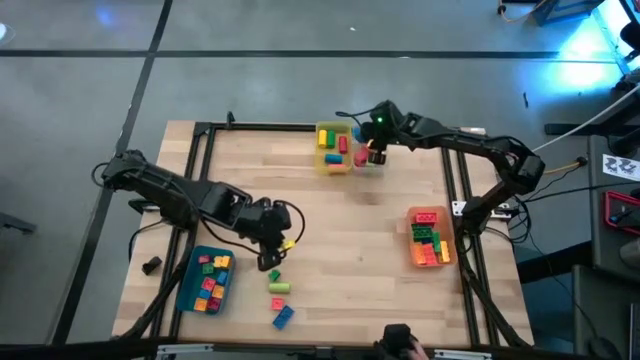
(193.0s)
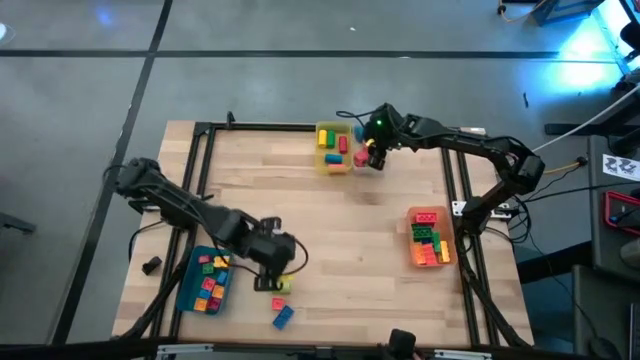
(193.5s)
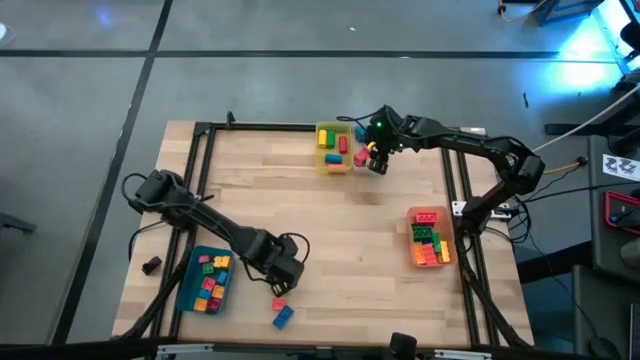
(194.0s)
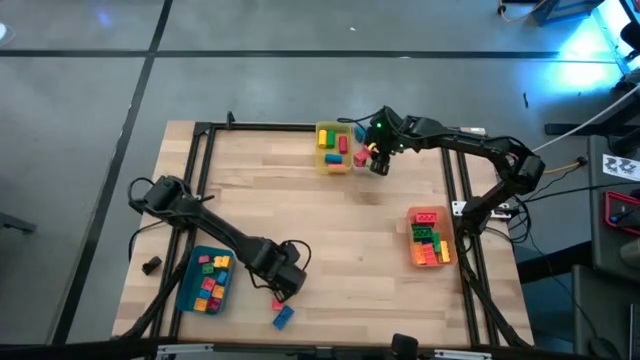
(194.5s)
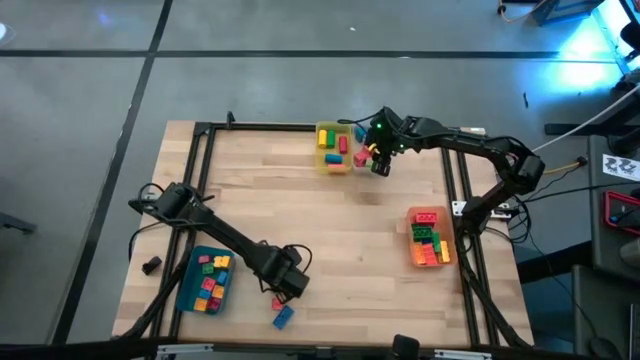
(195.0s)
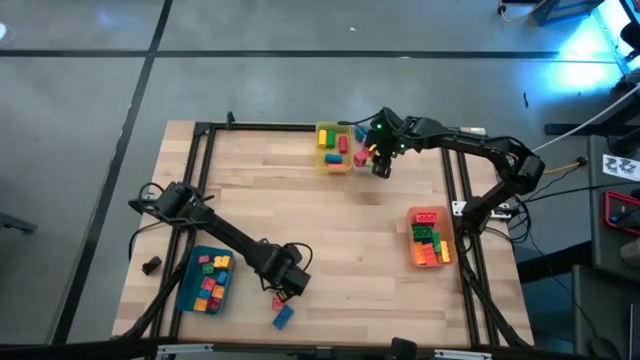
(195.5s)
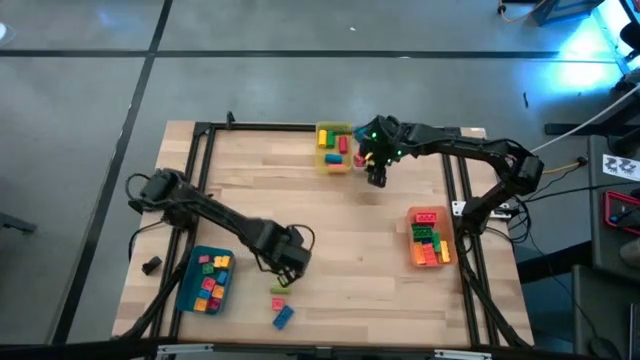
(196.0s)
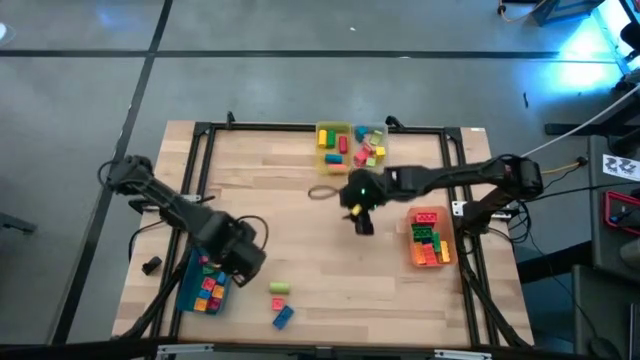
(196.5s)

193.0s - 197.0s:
Task: Sort blocks by size
Put the green square game piece into the blue bin

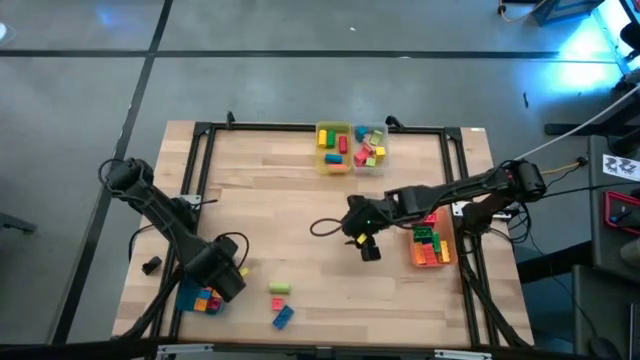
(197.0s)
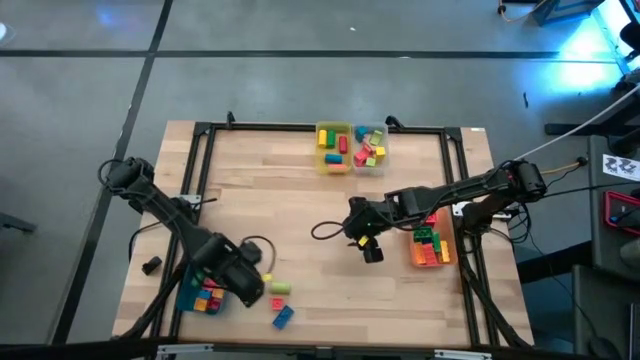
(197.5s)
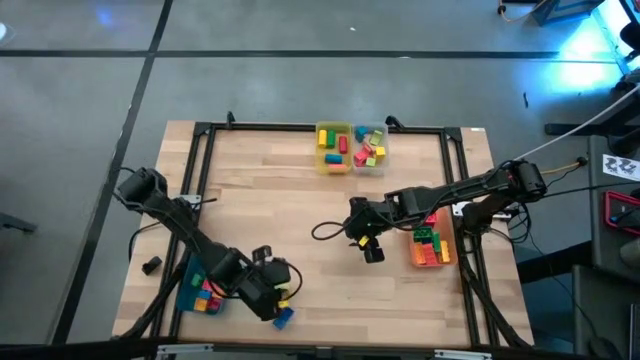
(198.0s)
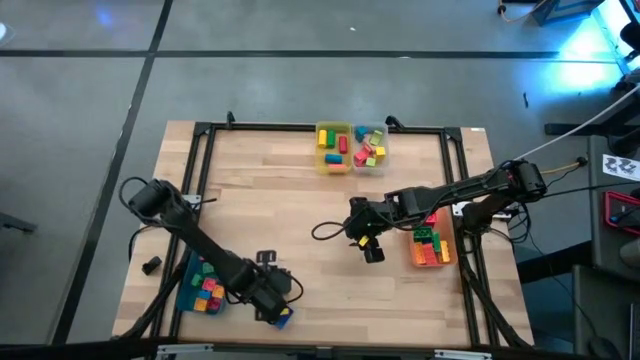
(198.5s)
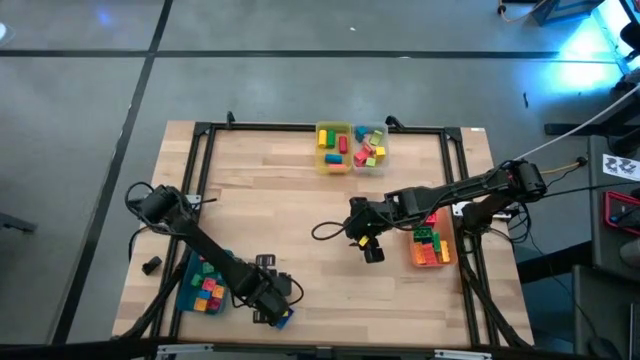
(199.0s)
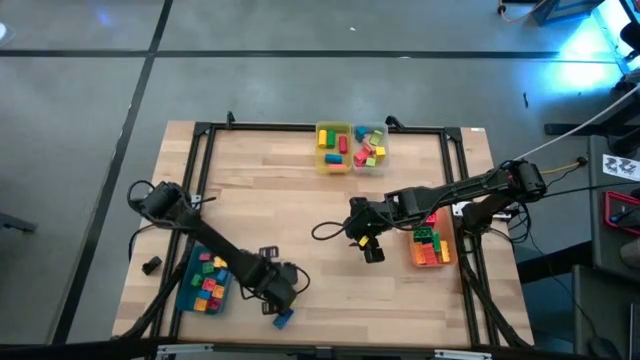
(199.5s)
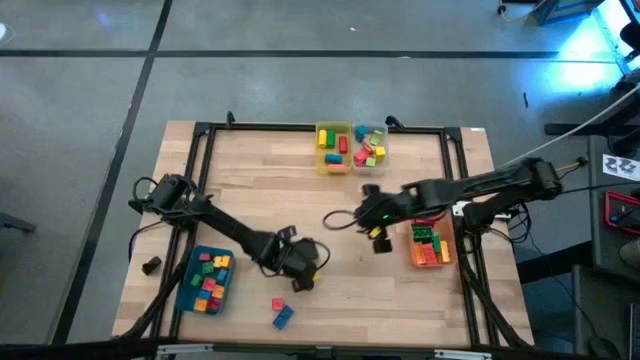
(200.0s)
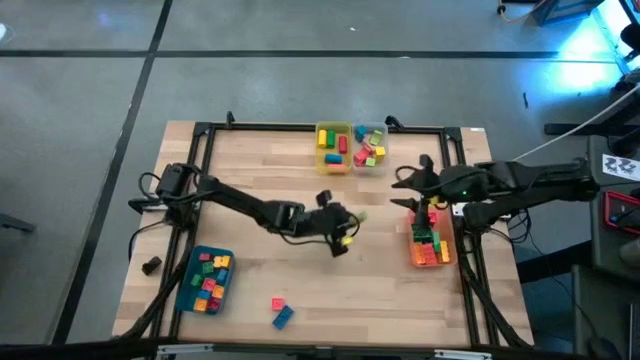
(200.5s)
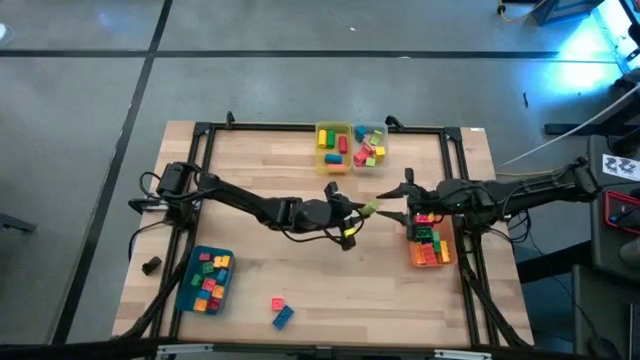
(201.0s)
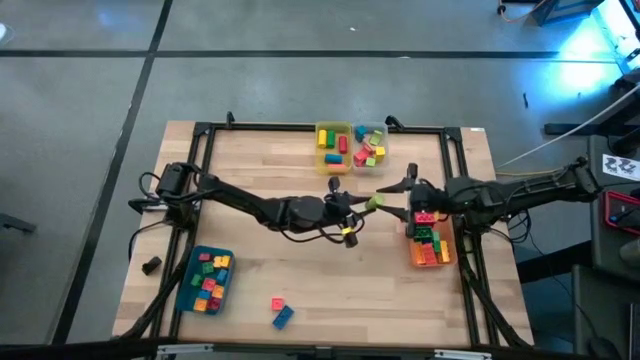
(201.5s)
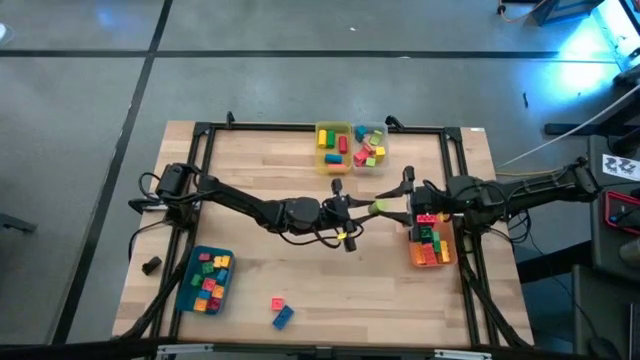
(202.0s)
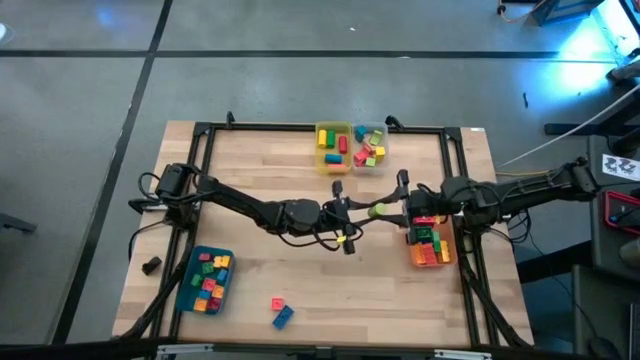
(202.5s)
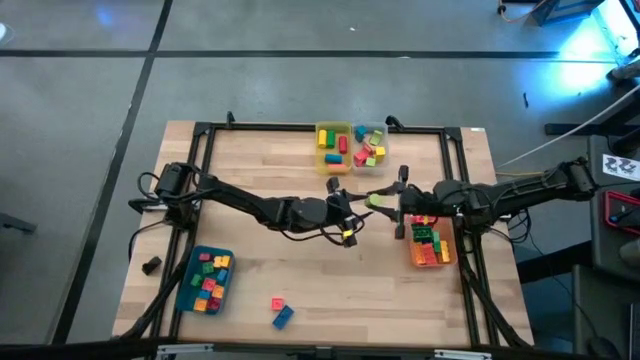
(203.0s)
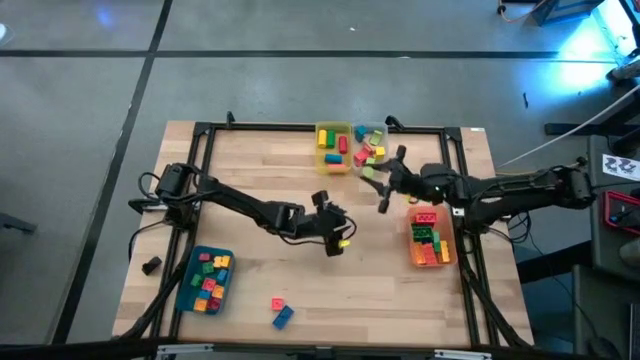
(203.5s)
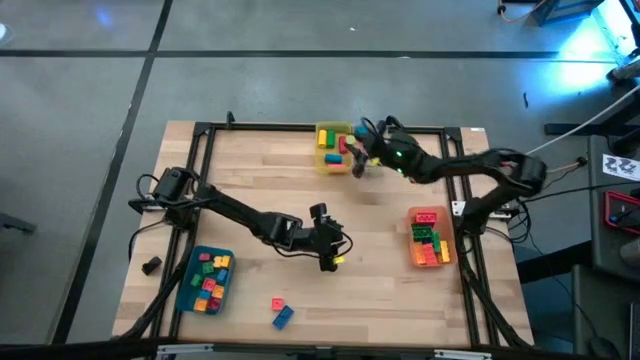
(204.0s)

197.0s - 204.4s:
Put the light green half circle block into the yellow bin

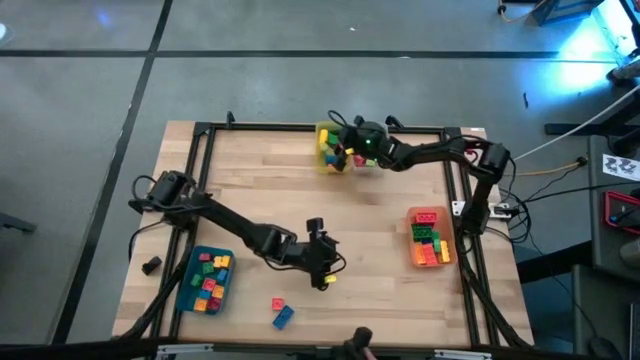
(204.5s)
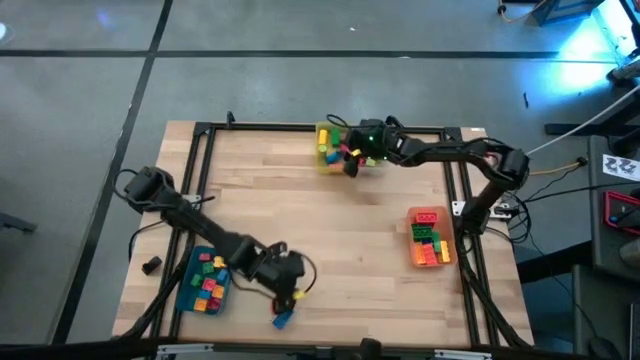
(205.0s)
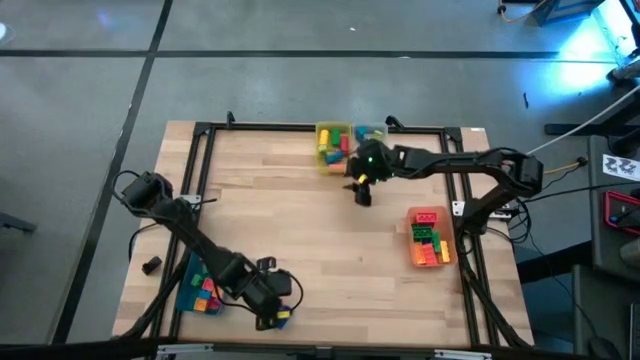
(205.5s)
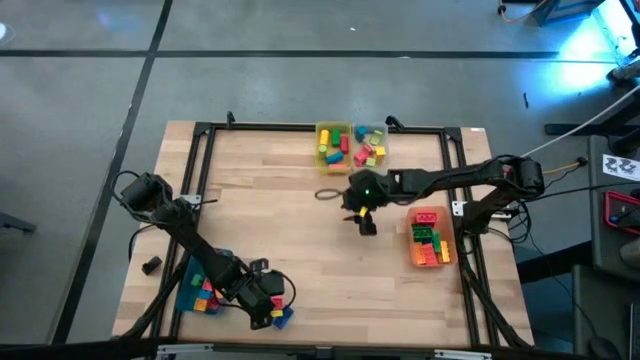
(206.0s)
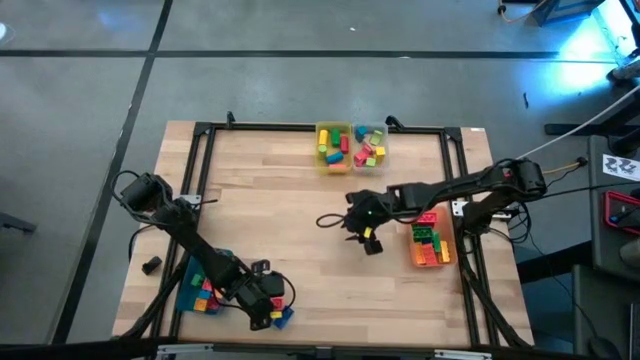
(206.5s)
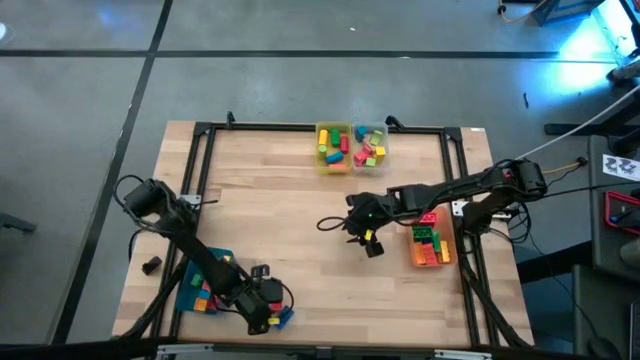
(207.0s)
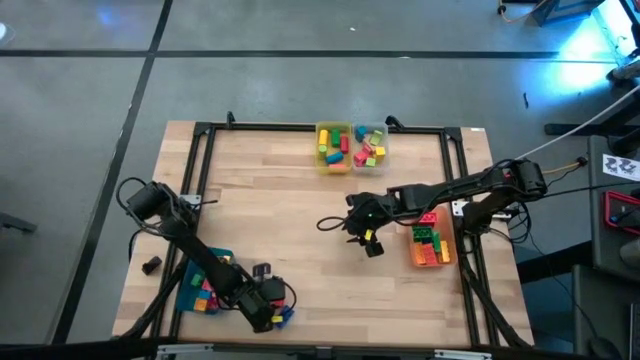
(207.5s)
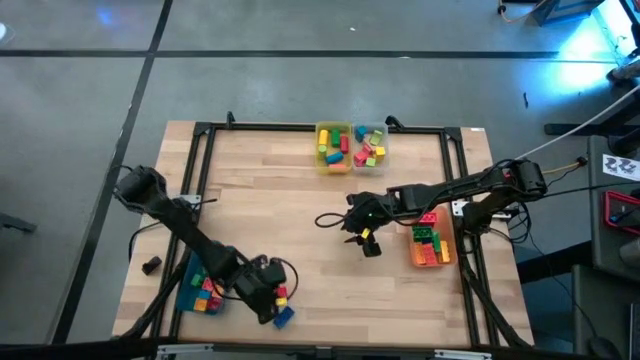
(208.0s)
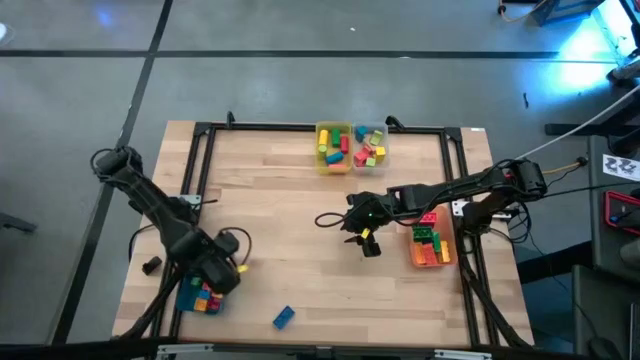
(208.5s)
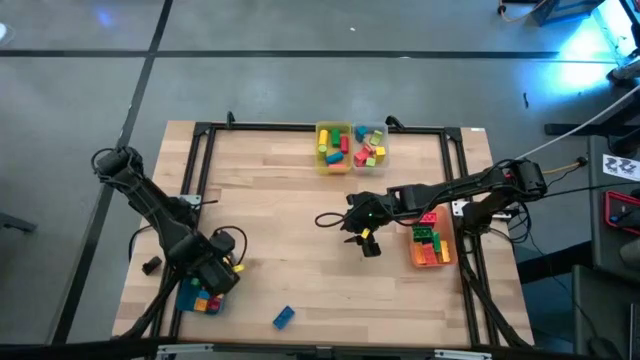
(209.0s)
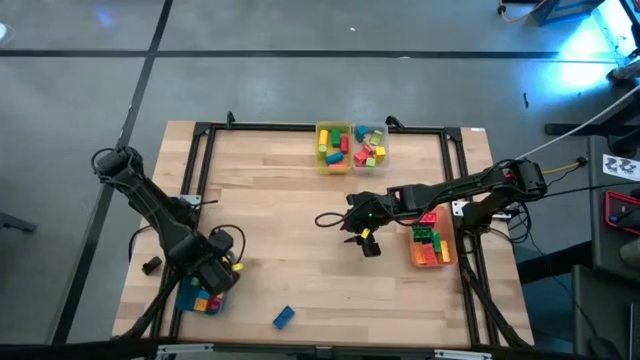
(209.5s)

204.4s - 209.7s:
Put the orange square game piece into the blue bin

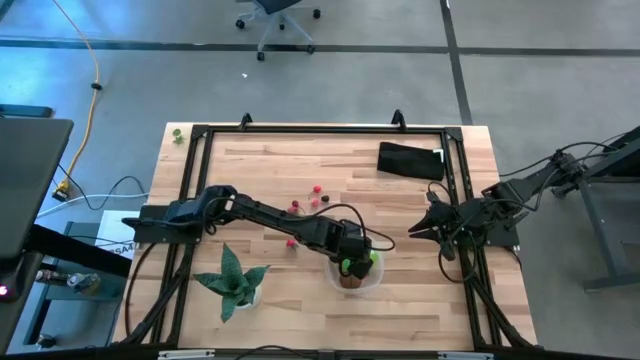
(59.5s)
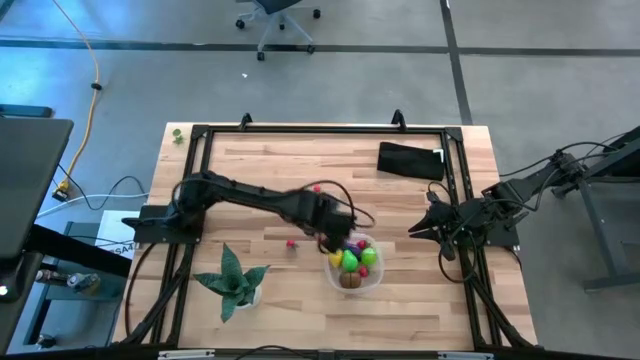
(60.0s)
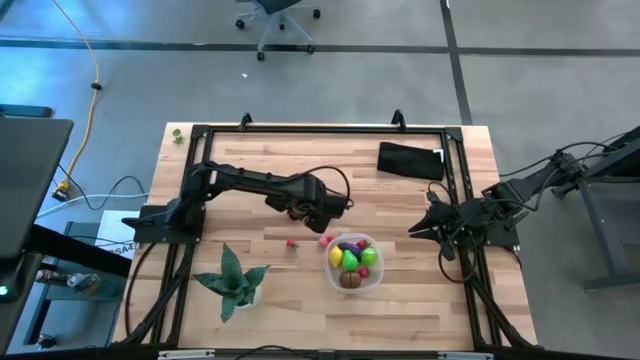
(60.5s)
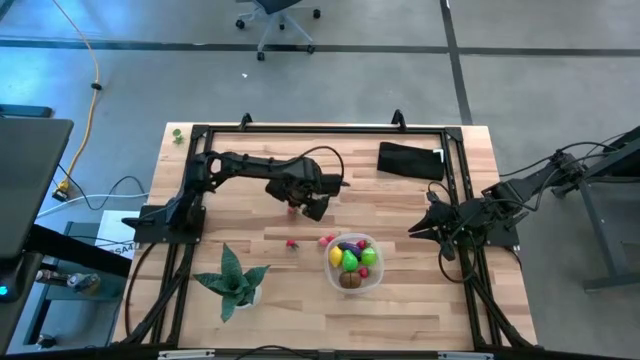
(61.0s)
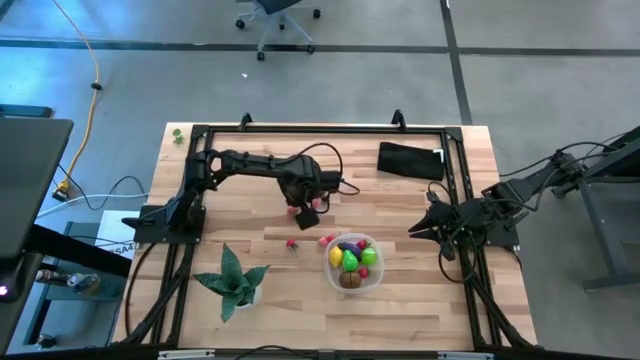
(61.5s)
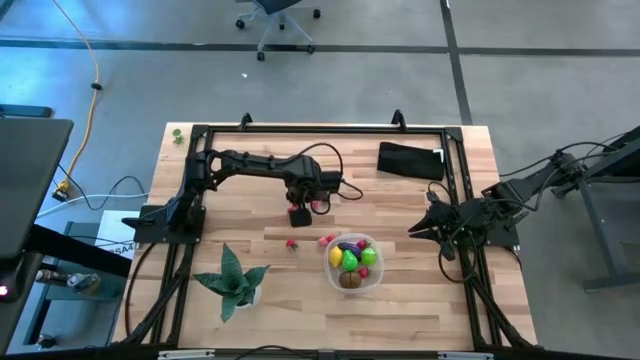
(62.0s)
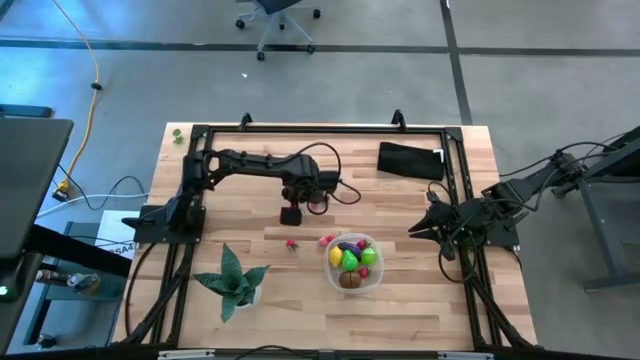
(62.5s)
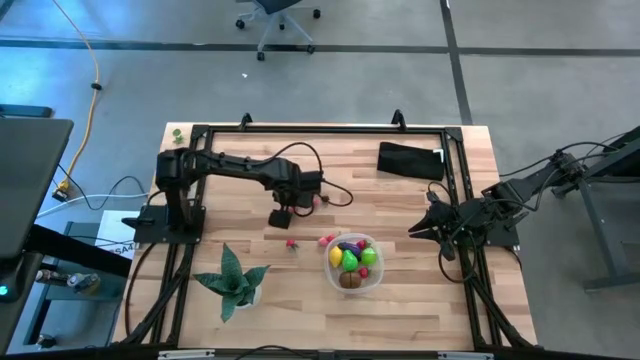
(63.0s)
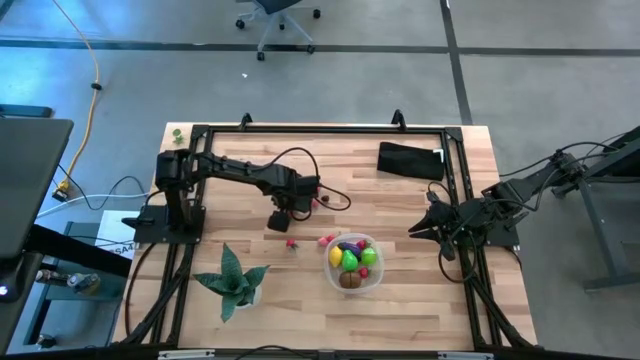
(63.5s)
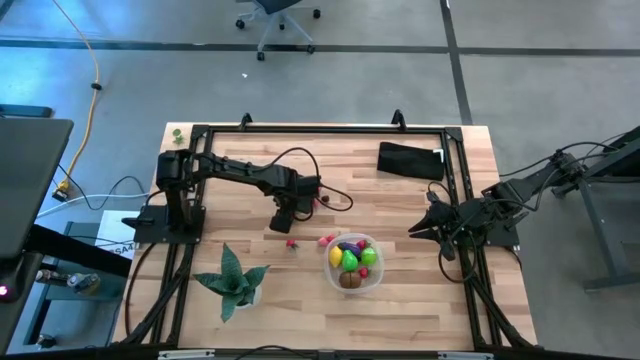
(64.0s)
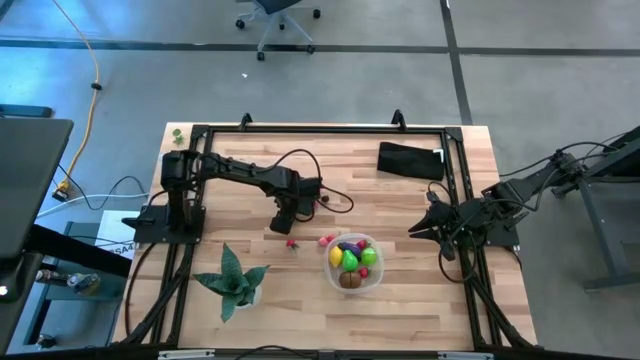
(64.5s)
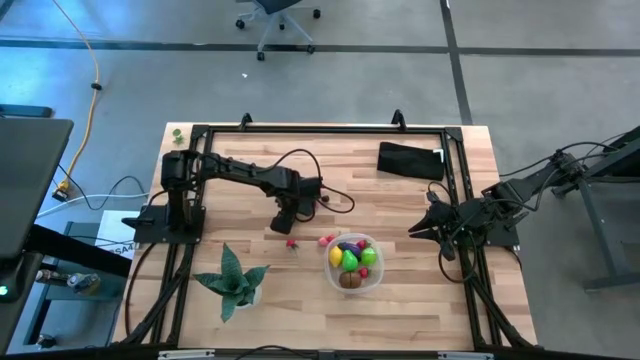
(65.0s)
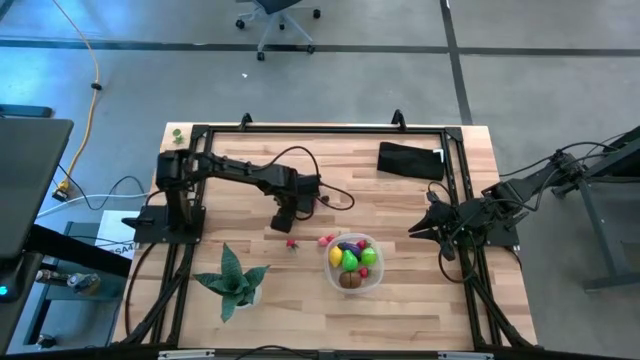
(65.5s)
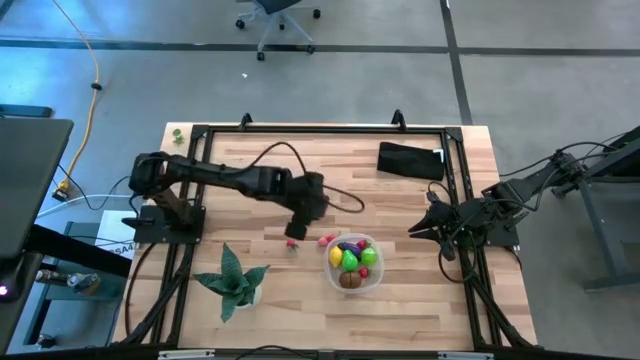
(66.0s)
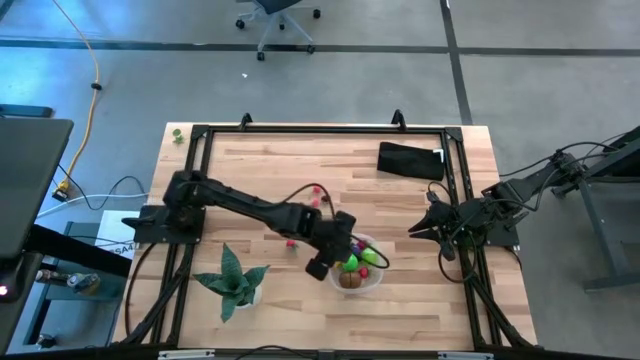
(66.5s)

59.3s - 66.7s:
Task: Pick and placing Produce into tupperware
Put the top strawberry into the bin
